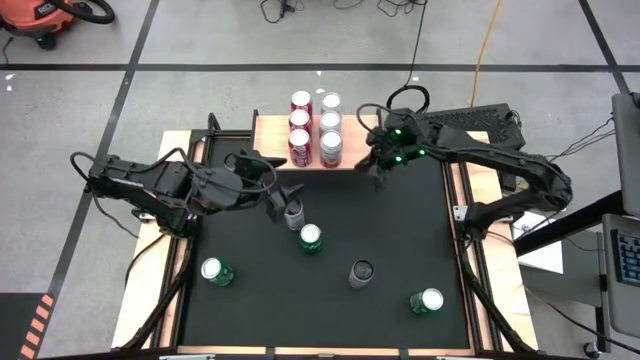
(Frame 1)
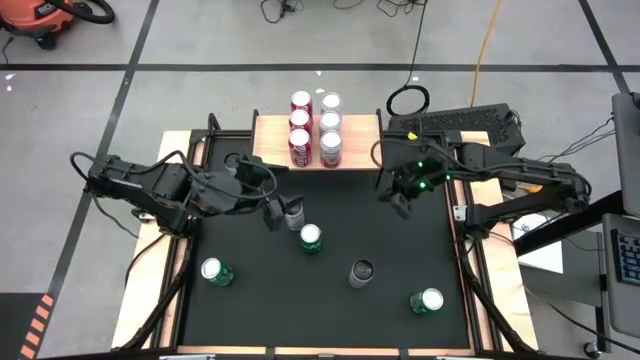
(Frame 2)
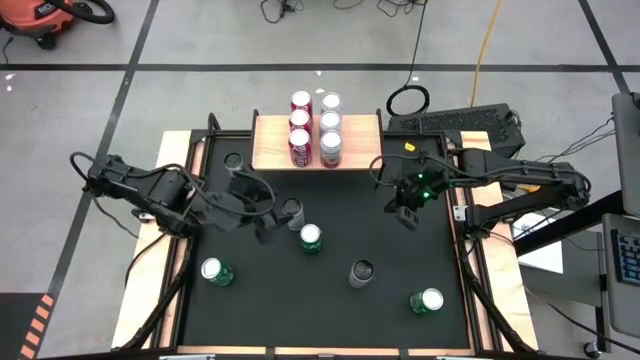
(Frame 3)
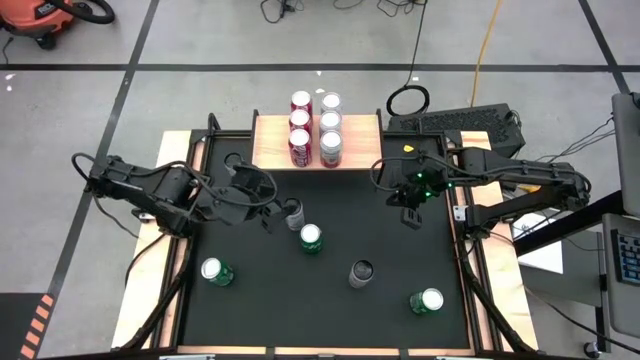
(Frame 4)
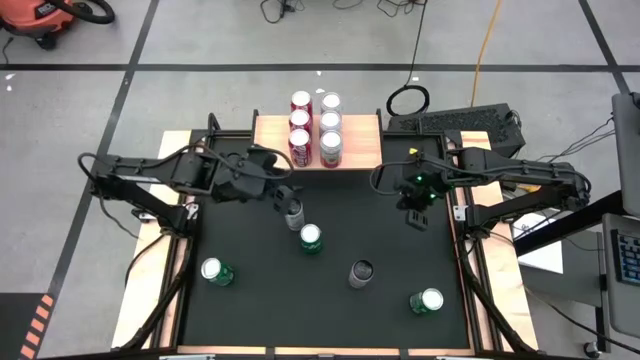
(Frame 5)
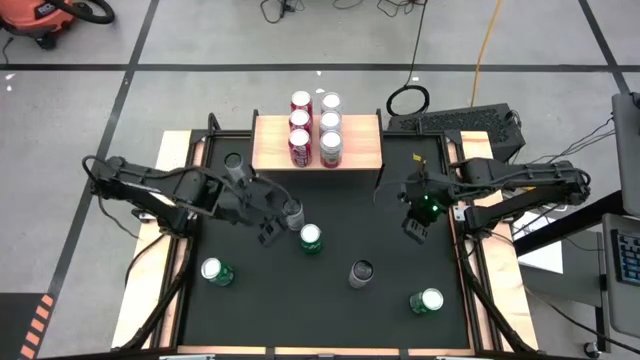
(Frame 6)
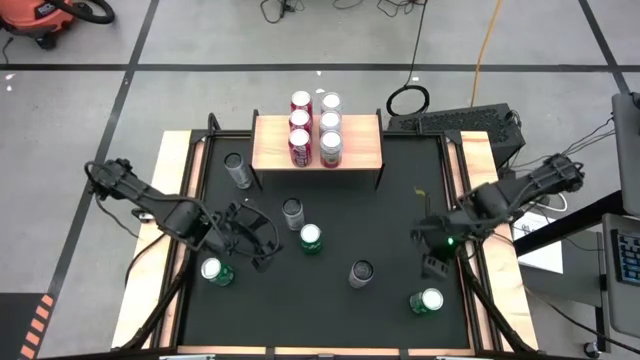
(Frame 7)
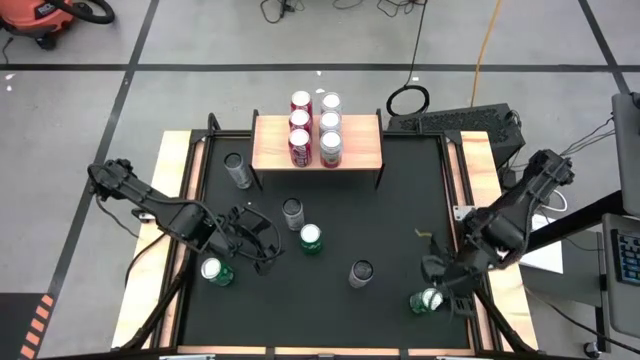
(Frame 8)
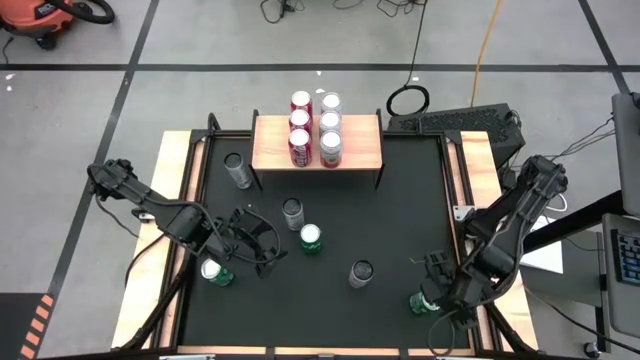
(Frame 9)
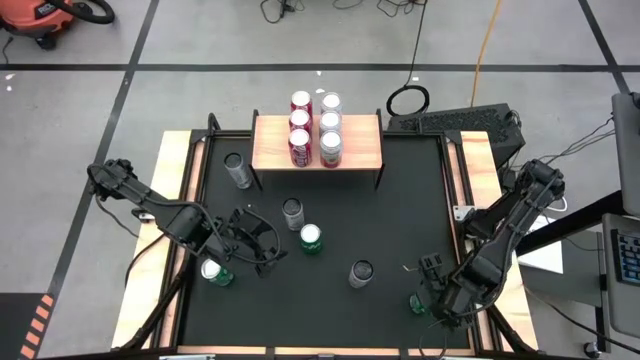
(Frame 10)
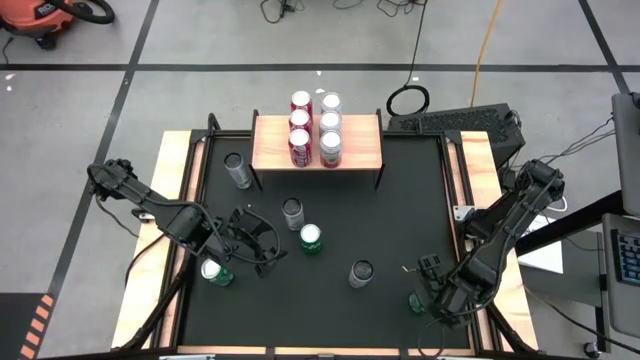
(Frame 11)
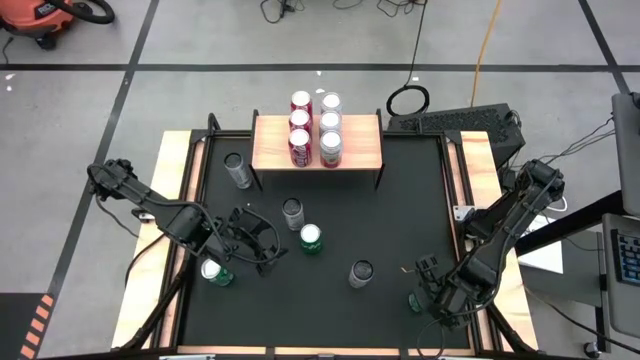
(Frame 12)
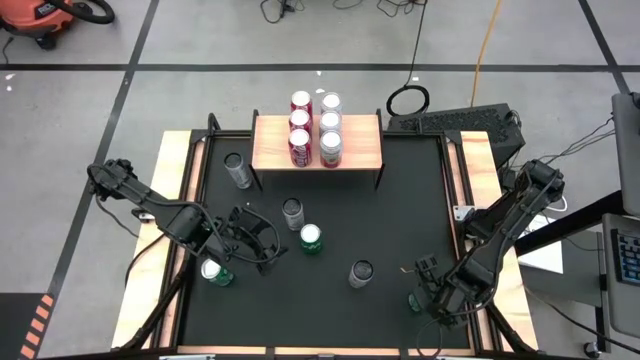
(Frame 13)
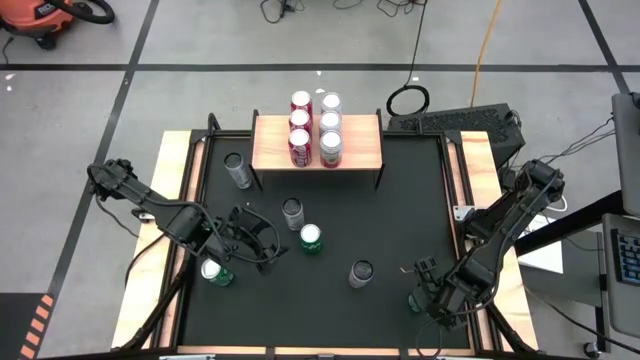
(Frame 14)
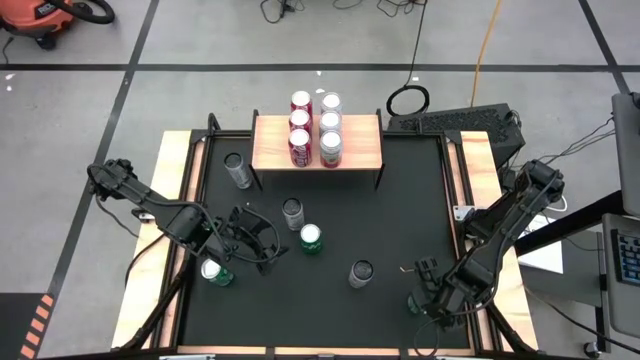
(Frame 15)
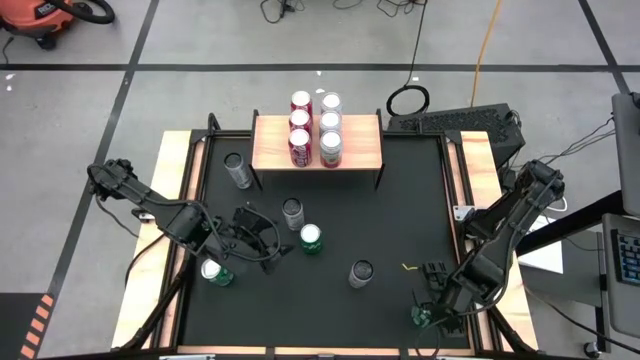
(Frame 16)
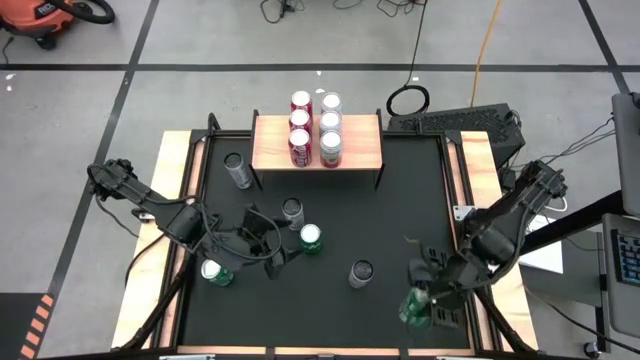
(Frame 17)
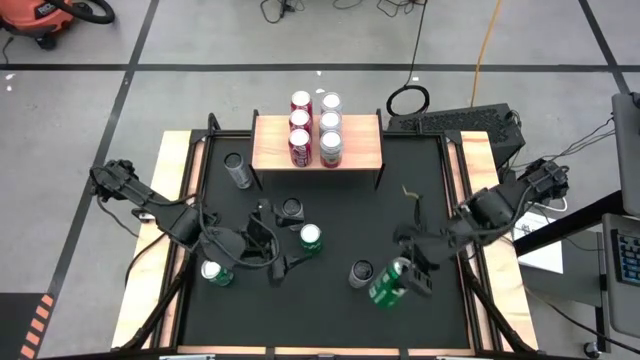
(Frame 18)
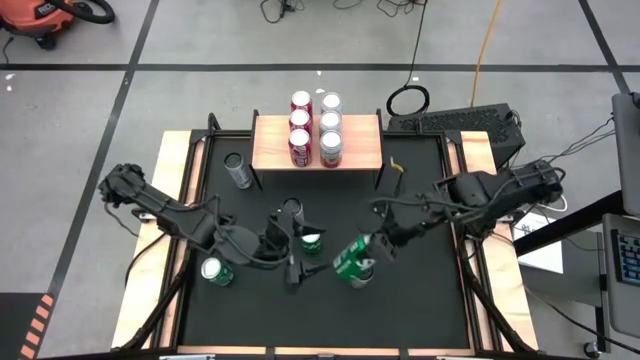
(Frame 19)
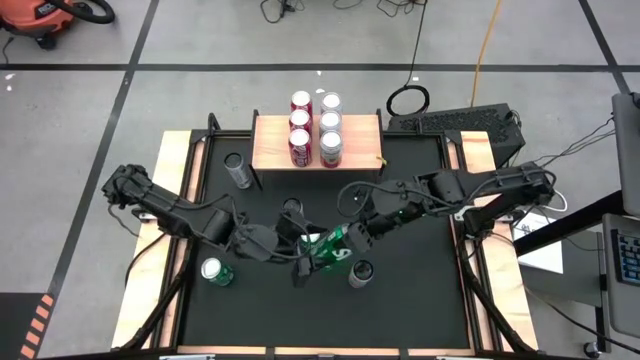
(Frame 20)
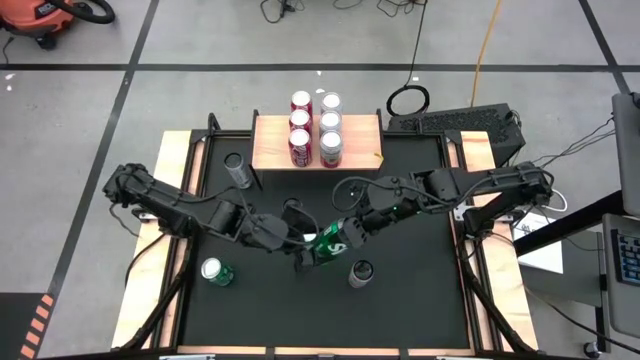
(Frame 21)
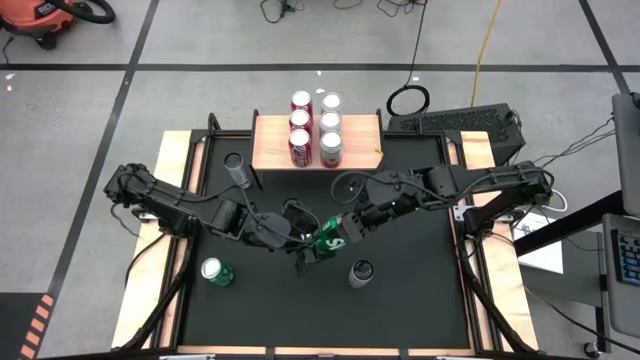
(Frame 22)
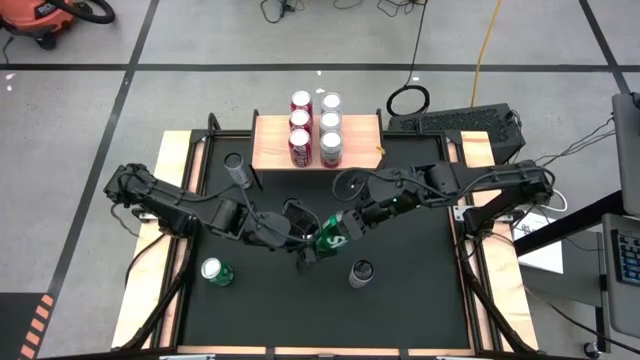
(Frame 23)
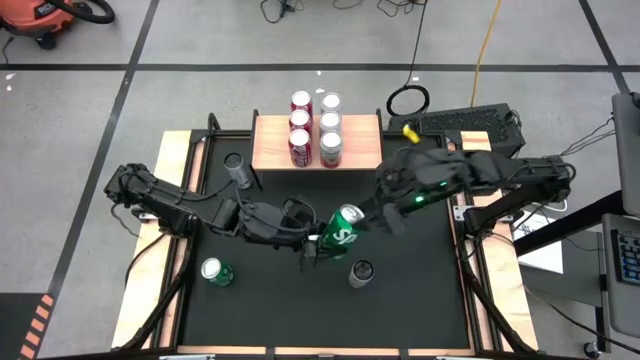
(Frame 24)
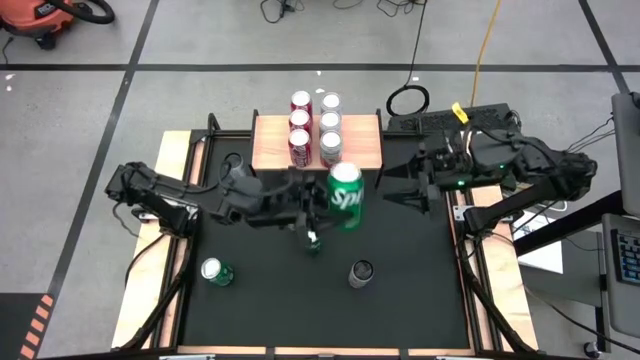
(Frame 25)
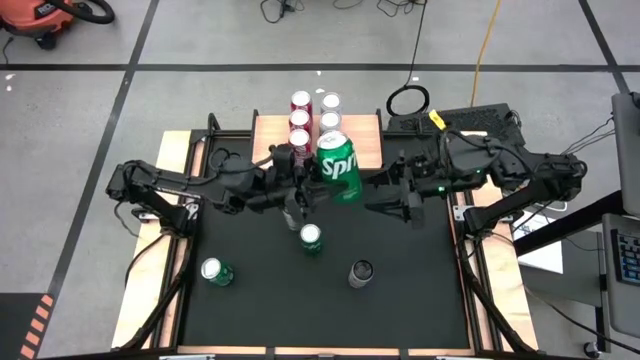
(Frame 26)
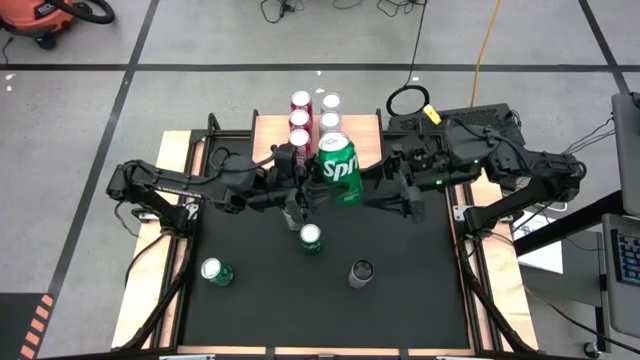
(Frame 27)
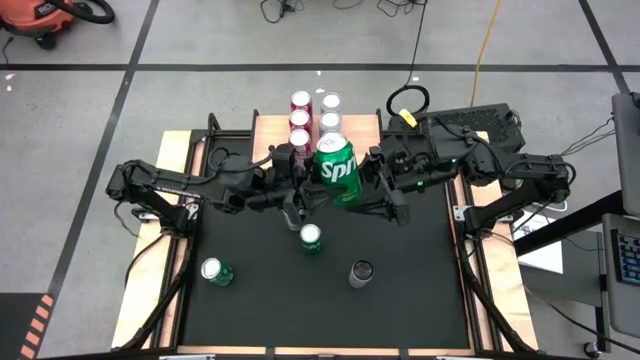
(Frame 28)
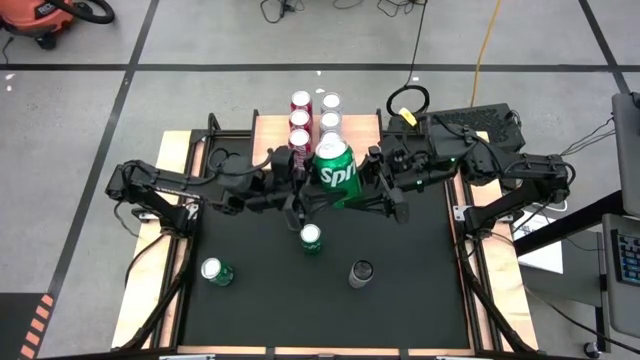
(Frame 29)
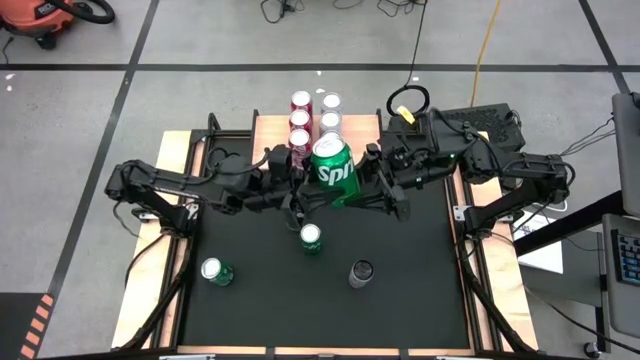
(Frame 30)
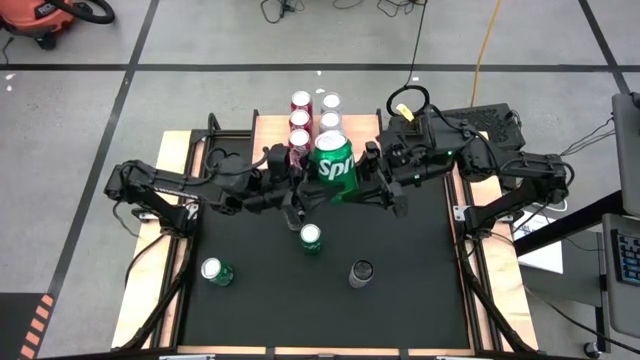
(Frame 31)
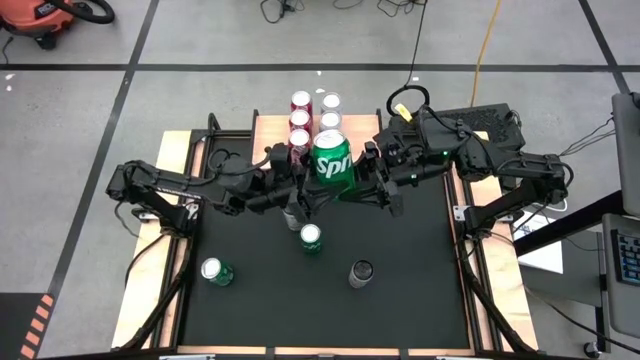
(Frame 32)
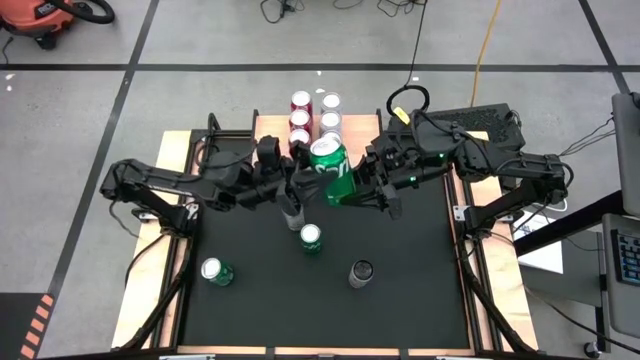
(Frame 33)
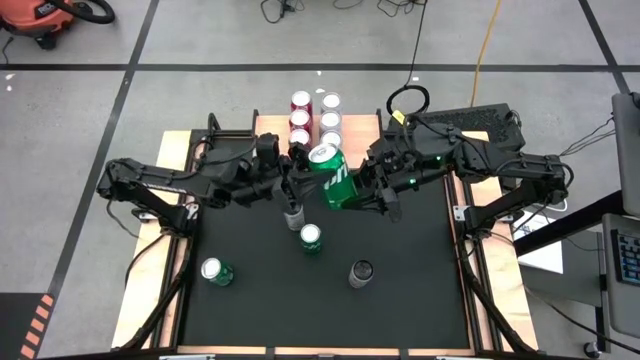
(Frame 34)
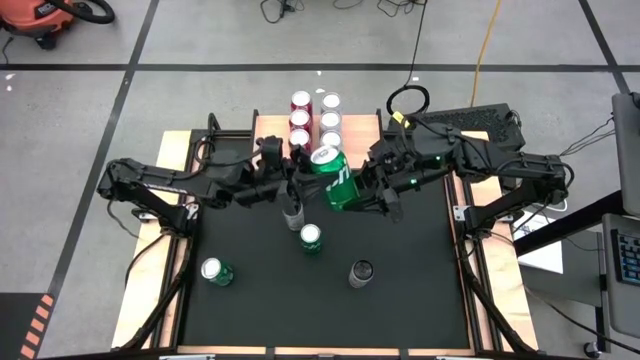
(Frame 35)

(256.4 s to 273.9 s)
Task: Place canned beverage on shelf
Put the bottom green soda can on the shelf

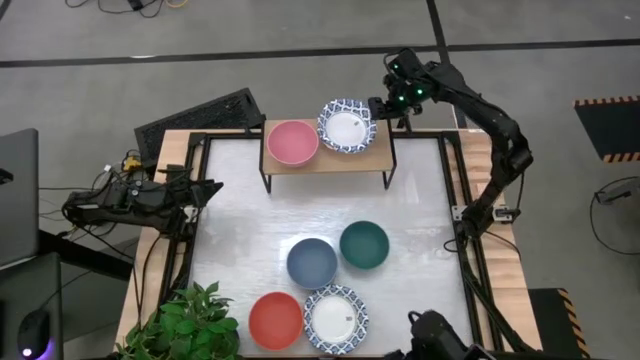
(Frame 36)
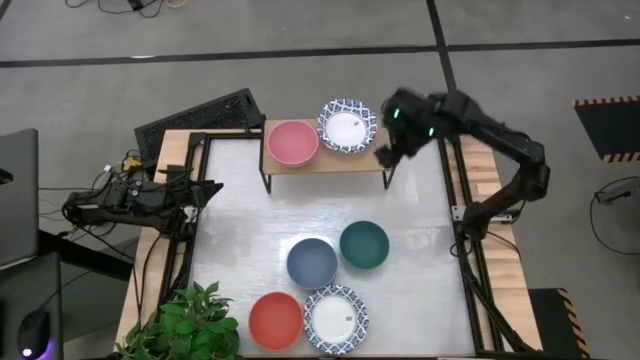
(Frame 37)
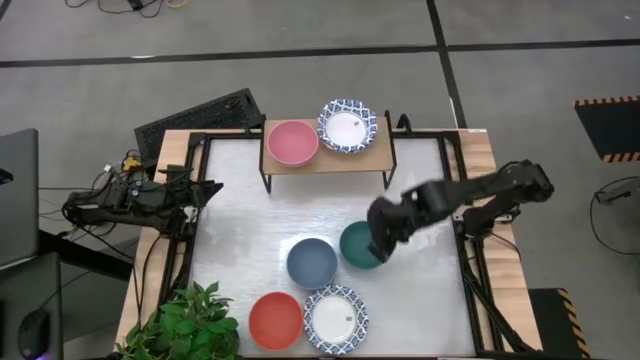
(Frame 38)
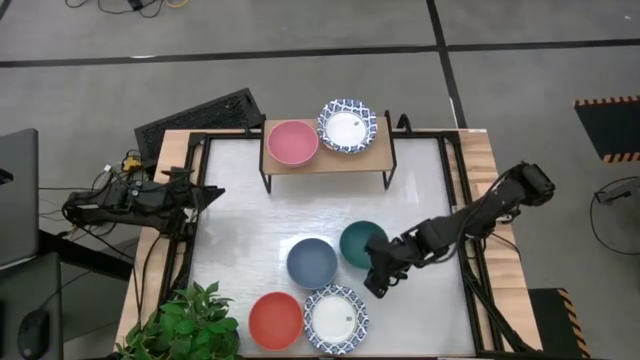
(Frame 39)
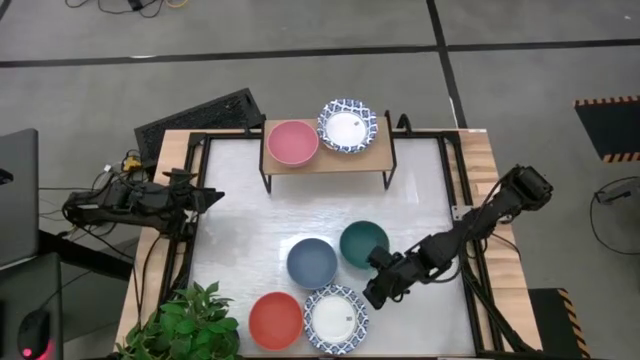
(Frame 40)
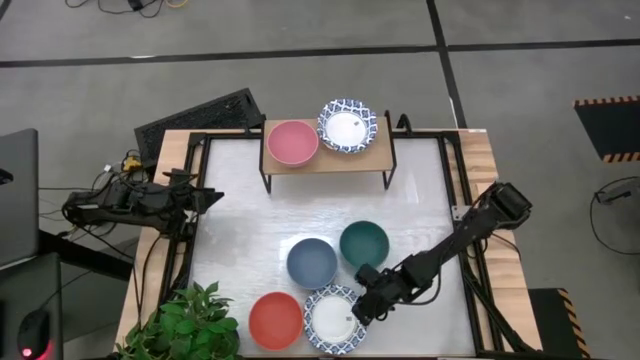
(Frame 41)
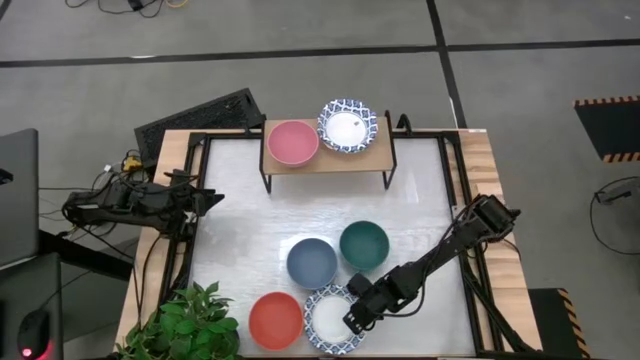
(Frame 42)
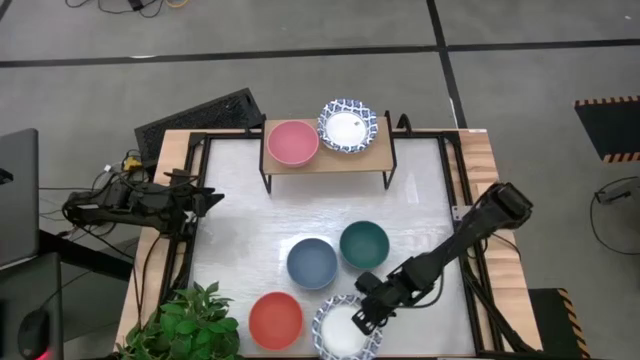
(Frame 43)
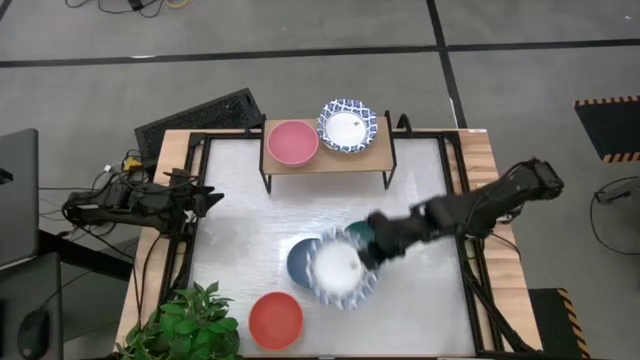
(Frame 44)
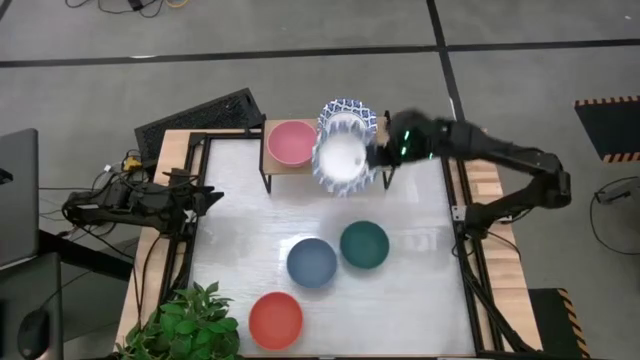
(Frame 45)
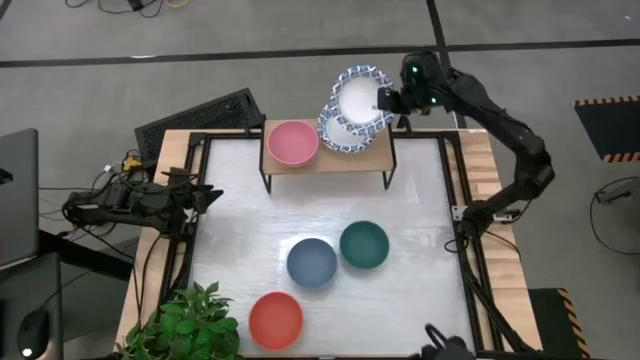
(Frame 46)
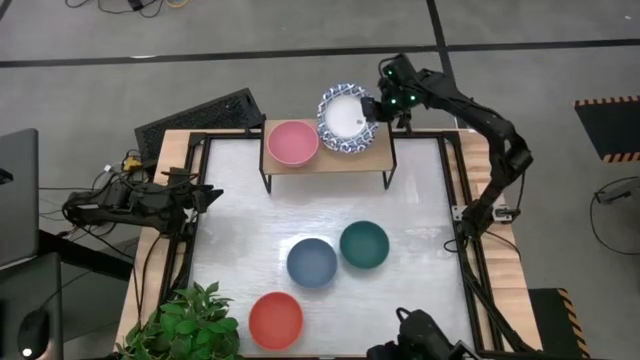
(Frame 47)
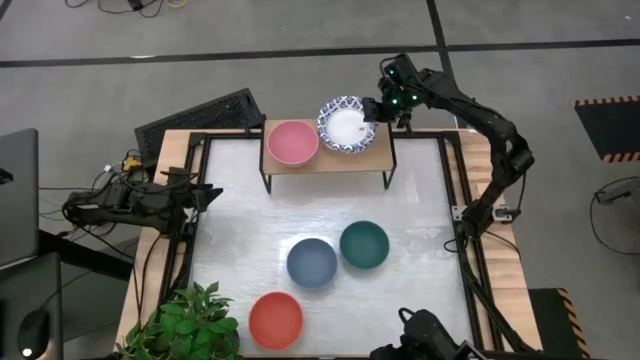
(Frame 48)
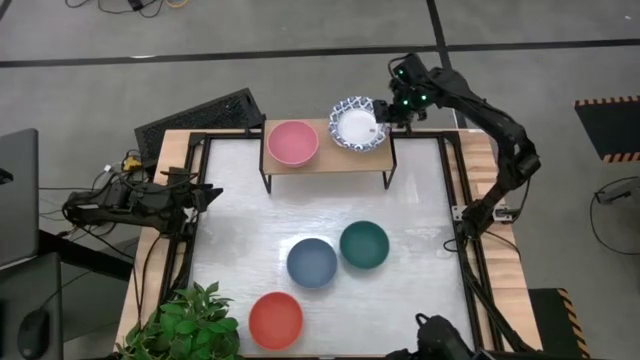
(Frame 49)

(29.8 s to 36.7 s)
Task: Place and stack bowls onto a shelf
Stack the white patterned bowl on top of the white patterned bowl on the shelf
